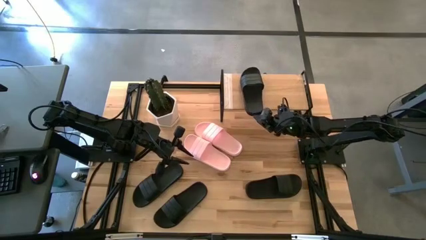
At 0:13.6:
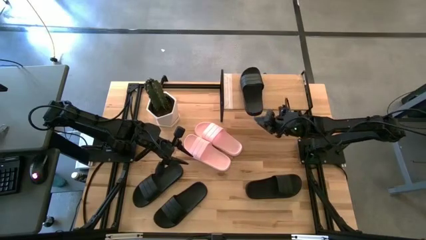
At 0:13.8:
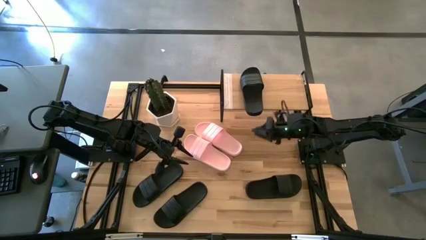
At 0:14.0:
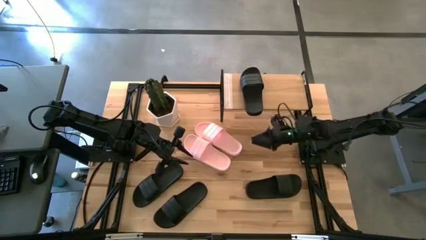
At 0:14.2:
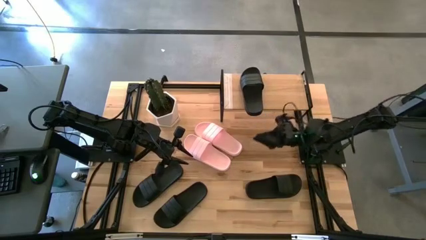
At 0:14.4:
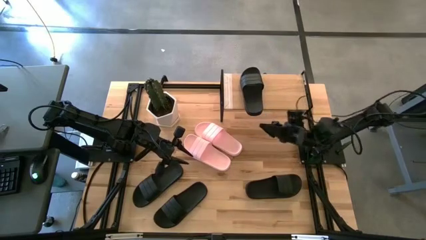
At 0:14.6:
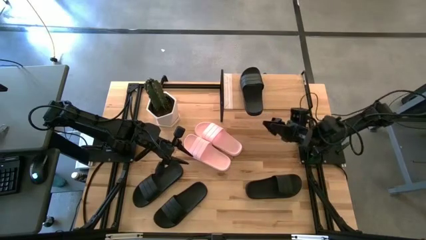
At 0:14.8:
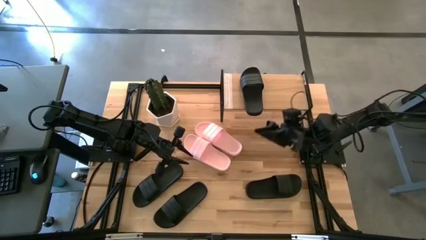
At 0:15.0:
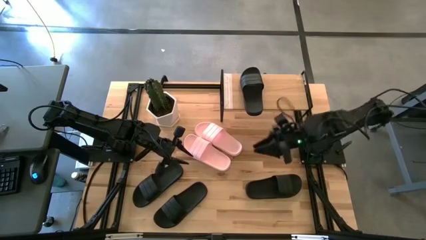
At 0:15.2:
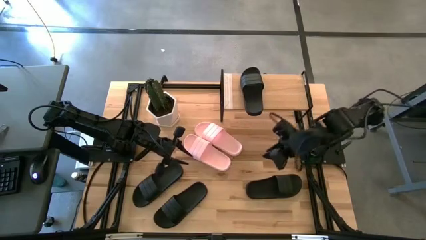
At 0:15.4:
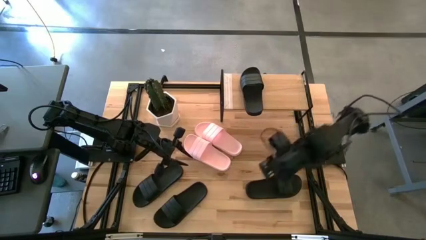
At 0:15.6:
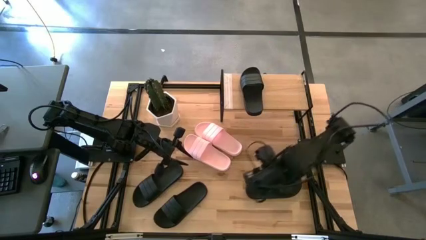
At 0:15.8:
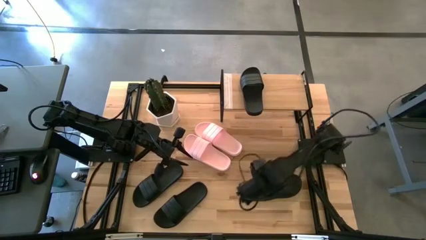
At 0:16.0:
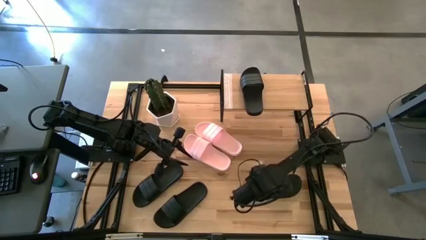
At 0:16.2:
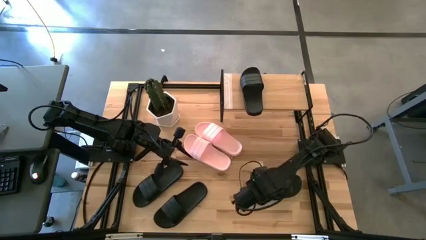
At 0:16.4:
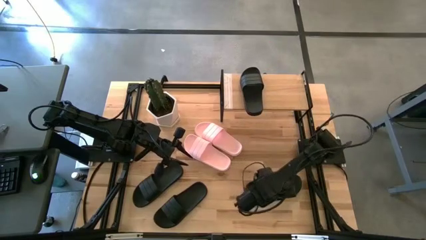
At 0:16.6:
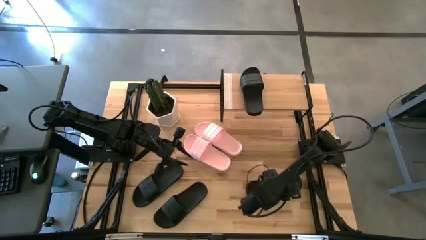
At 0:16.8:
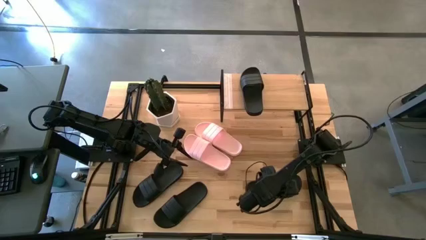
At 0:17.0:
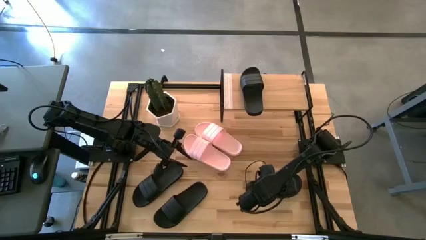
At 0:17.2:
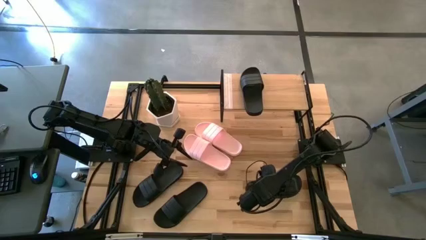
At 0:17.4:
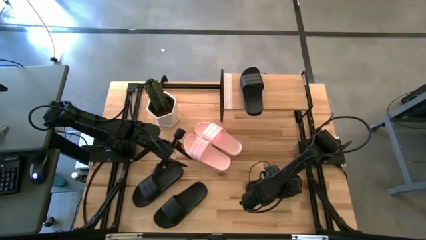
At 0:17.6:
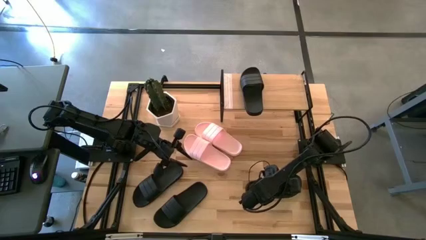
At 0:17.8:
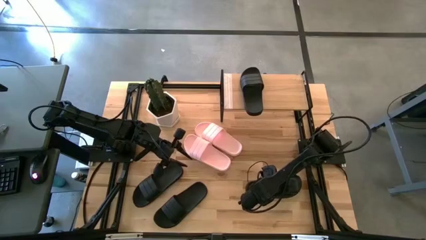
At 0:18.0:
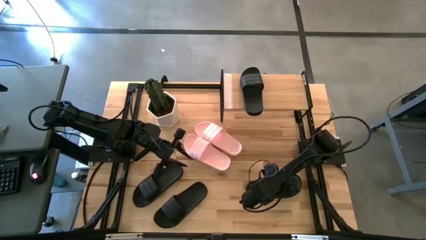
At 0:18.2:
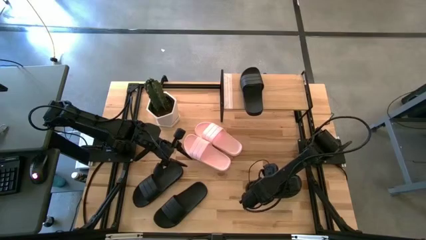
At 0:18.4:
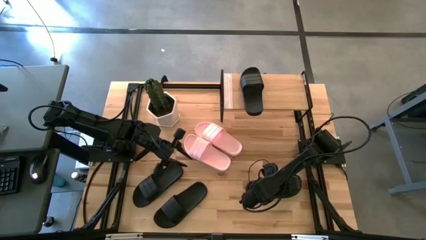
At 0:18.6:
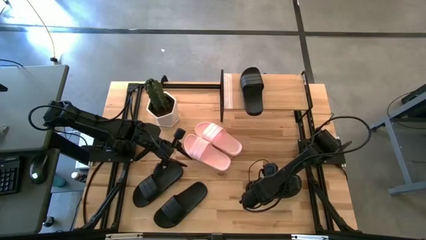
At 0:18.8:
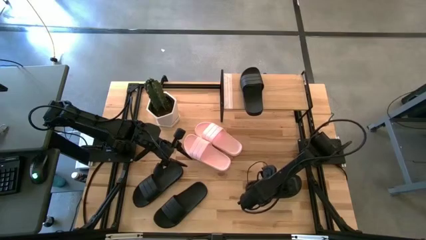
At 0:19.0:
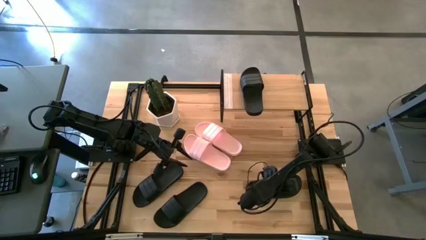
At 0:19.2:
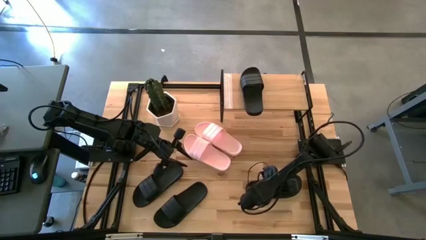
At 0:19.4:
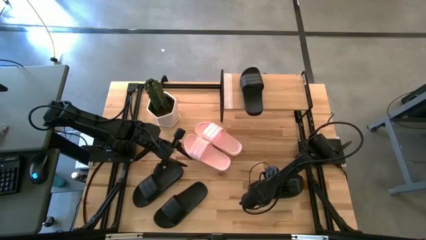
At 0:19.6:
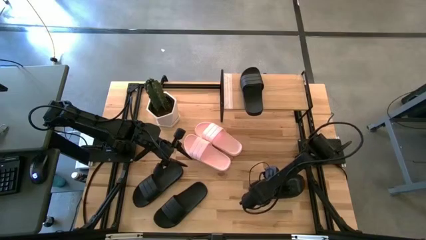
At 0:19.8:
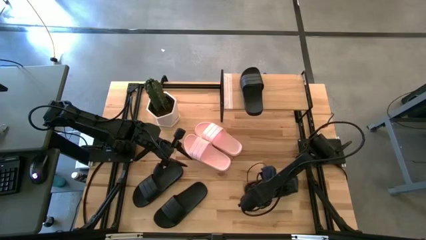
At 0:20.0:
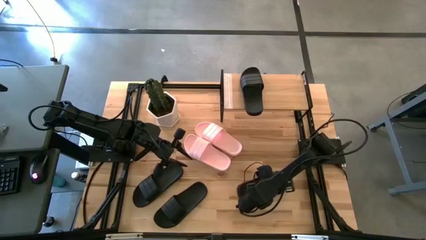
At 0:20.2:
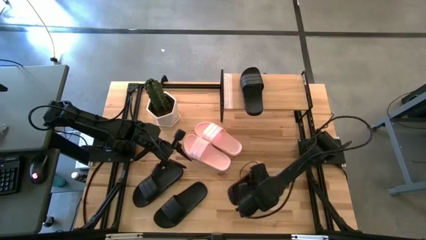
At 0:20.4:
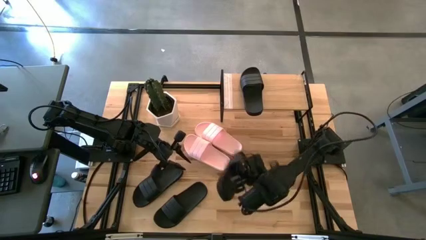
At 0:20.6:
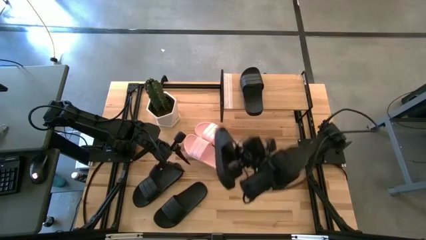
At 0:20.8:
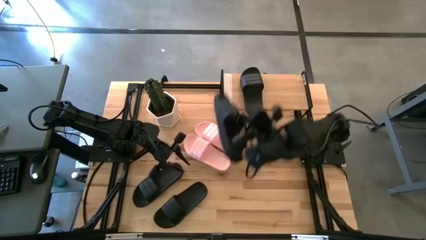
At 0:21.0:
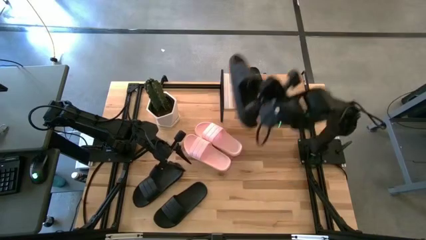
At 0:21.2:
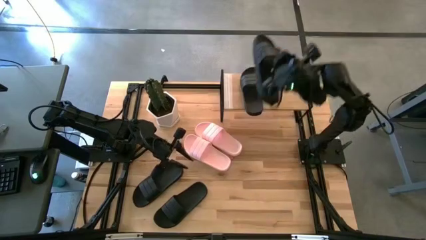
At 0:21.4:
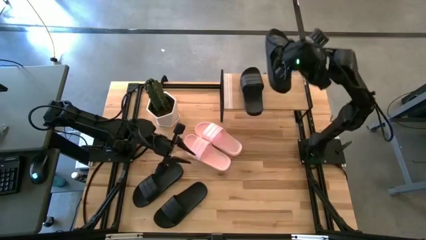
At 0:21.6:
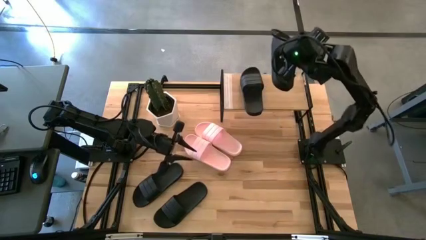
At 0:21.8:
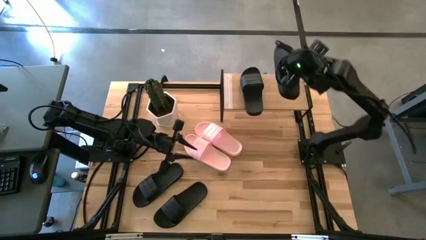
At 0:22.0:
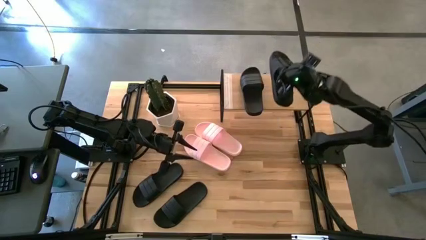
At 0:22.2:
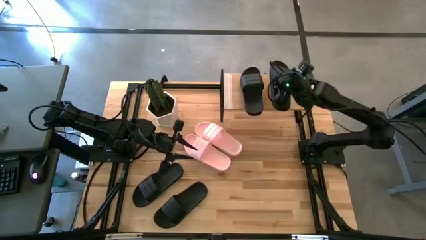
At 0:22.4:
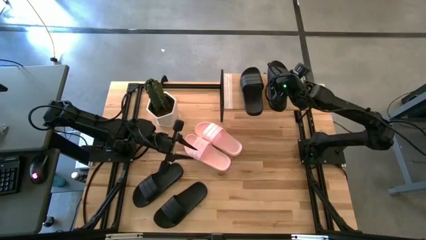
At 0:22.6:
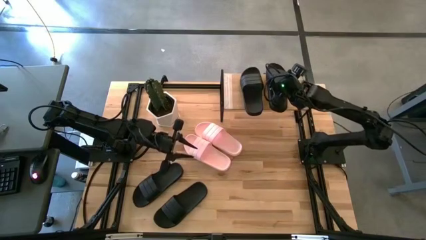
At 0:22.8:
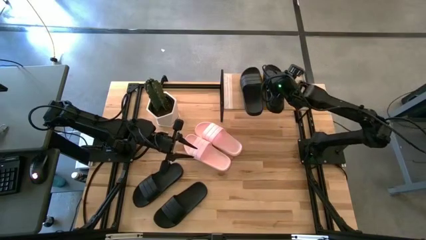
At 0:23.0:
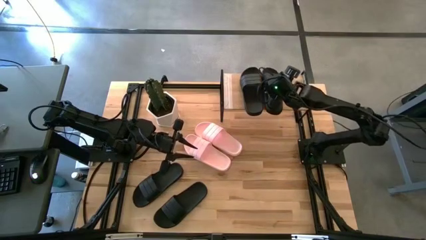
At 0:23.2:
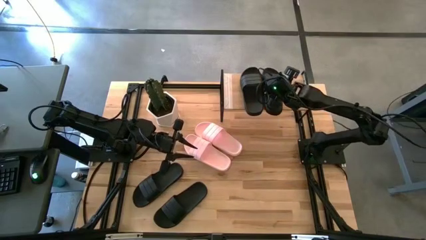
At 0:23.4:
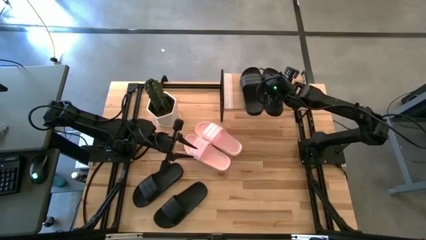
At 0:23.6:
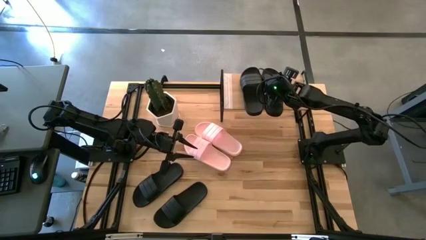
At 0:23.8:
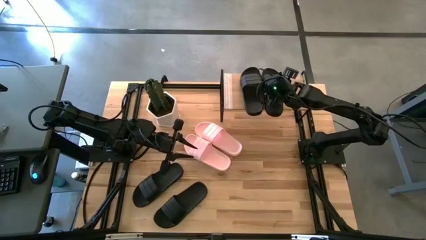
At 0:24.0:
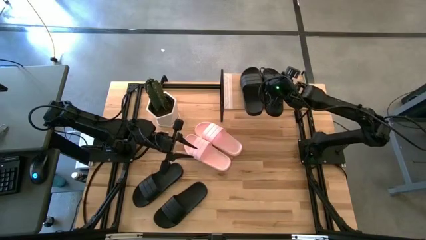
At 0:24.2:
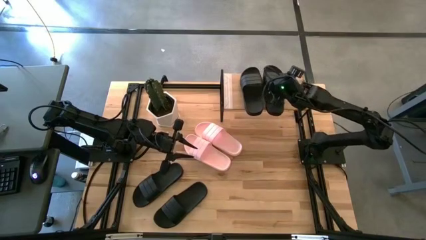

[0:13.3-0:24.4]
Task: Pick and place slides into the shelf
Put the black slipper on the shelf

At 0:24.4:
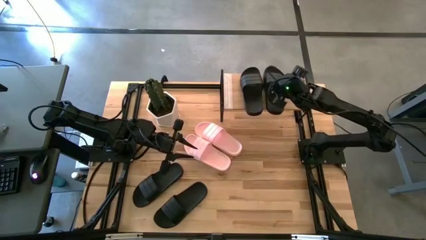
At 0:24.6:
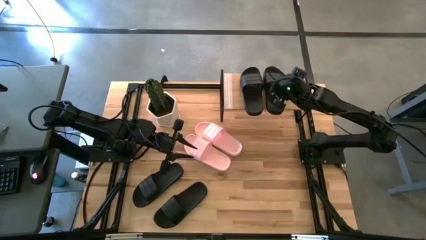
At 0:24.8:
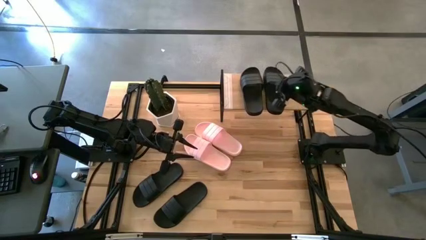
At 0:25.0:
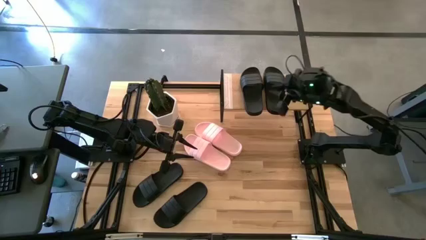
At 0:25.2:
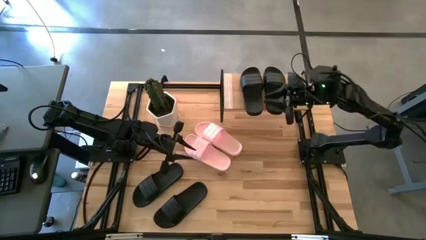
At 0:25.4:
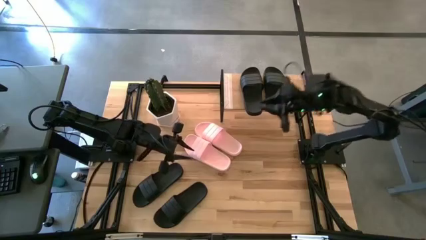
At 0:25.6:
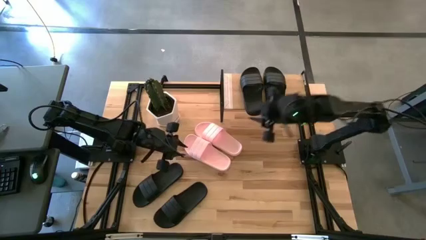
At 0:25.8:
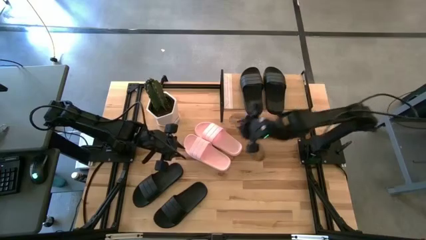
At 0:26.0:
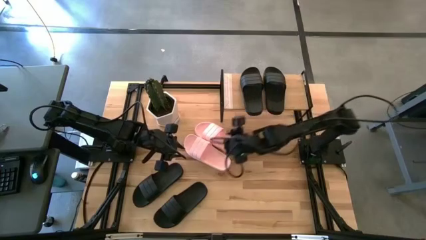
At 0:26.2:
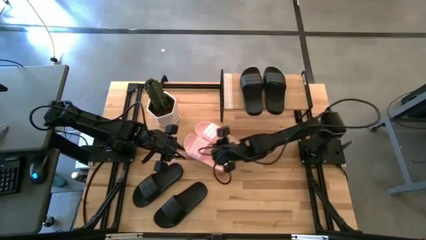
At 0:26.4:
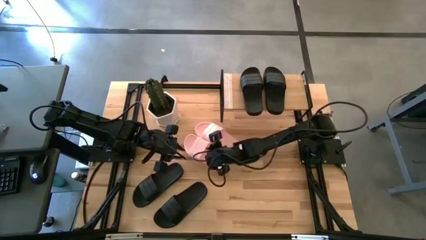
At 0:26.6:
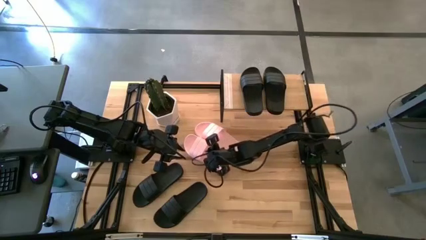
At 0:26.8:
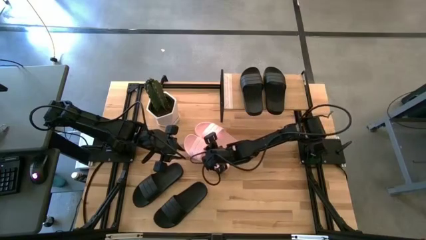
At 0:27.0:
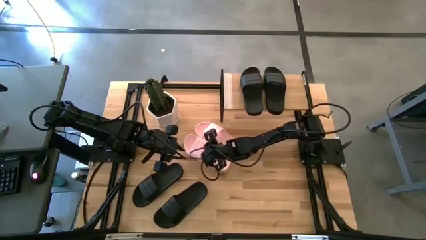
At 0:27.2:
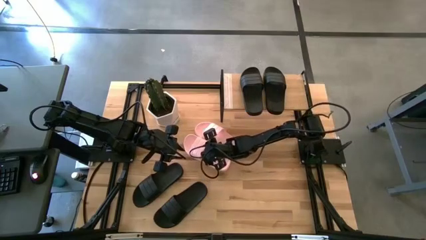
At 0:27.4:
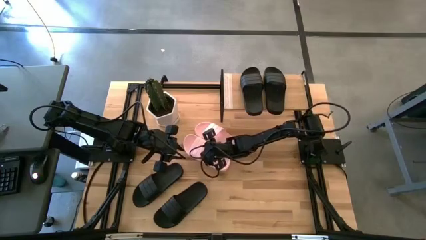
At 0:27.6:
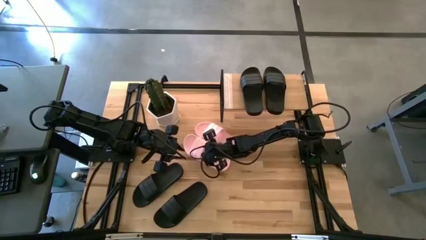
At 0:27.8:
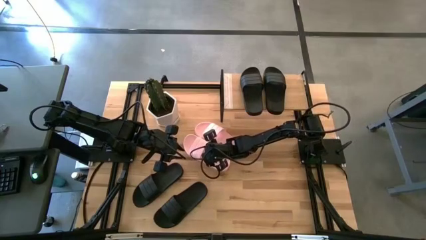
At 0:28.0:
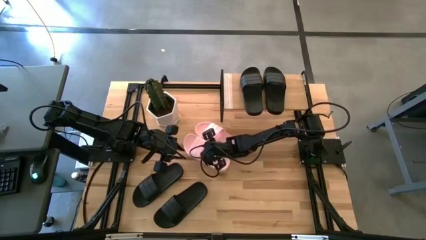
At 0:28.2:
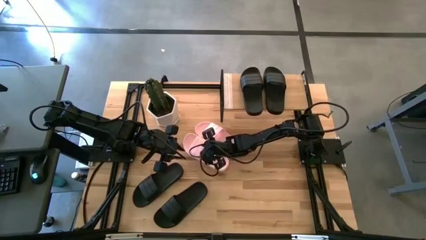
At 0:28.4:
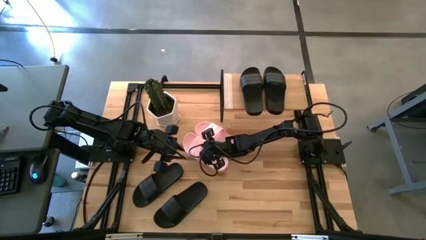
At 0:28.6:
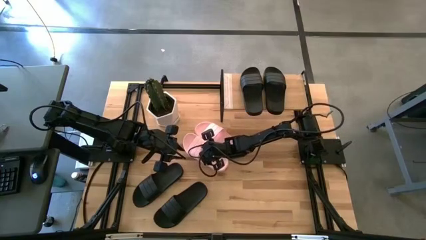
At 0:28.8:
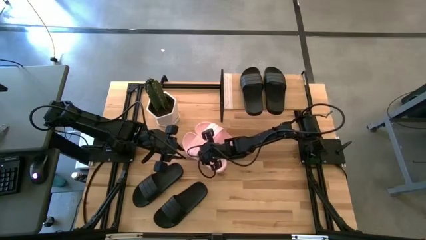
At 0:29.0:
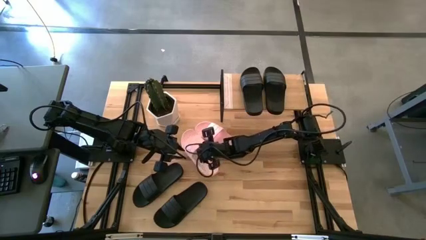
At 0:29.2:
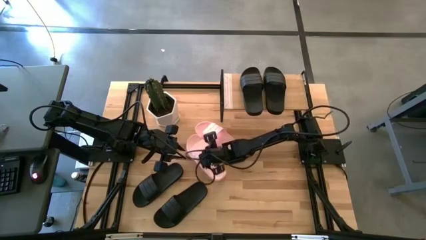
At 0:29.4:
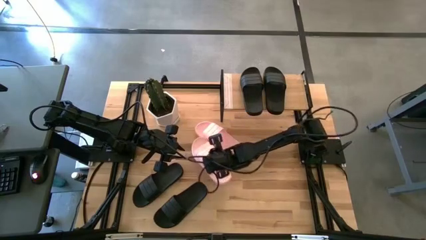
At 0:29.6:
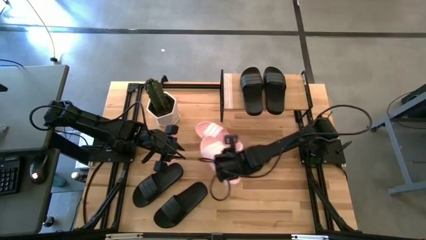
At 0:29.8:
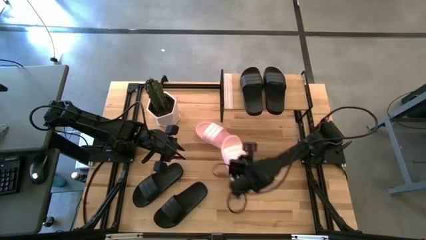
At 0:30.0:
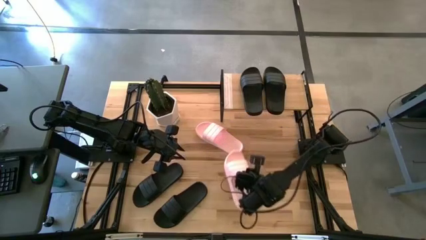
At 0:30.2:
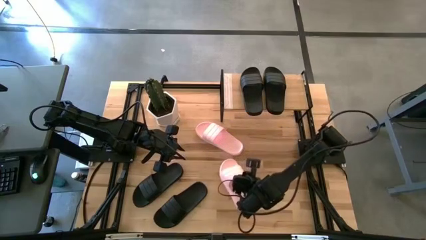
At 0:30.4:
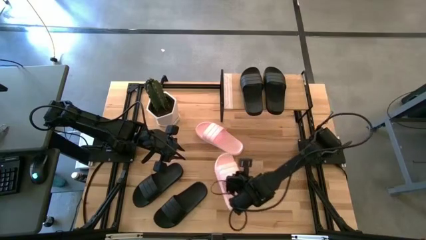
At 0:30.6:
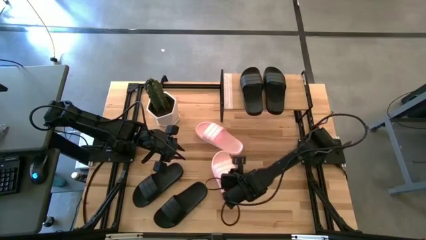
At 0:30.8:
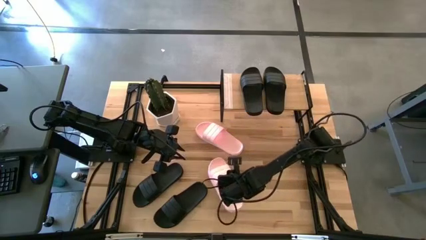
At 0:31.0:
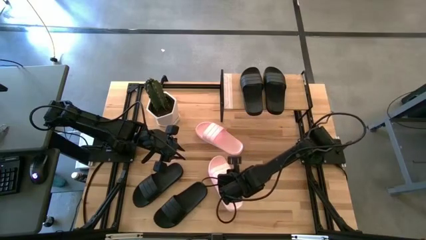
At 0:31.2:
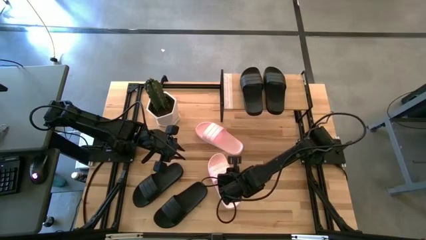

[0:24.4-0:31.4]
Prepare the pink slipper
